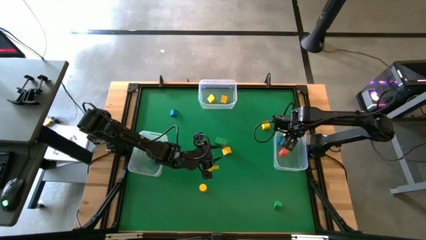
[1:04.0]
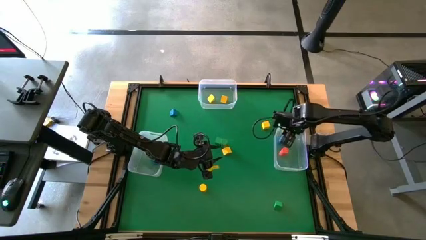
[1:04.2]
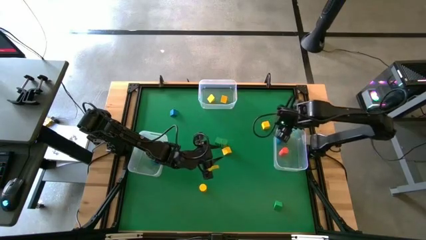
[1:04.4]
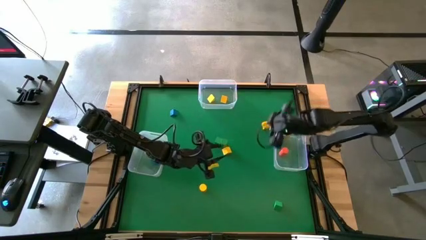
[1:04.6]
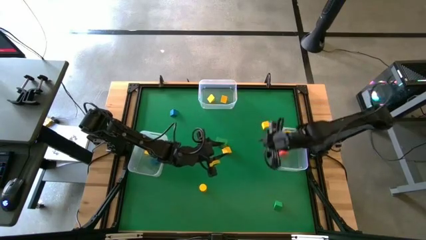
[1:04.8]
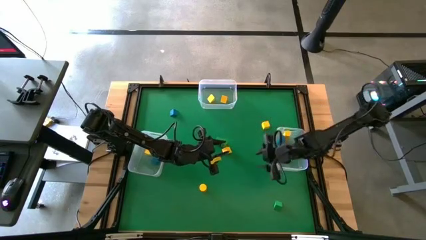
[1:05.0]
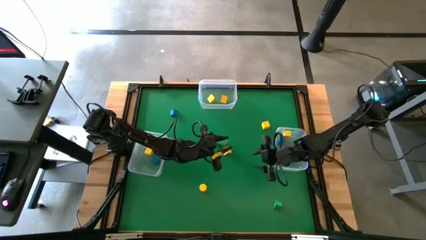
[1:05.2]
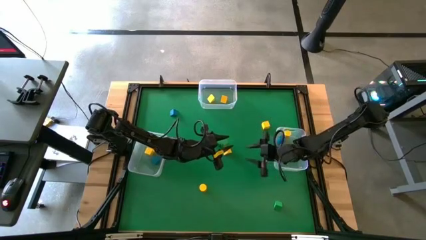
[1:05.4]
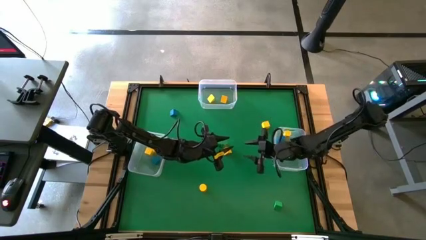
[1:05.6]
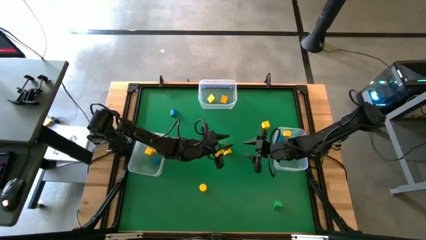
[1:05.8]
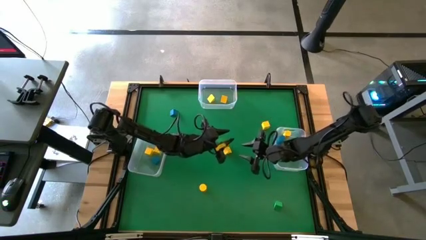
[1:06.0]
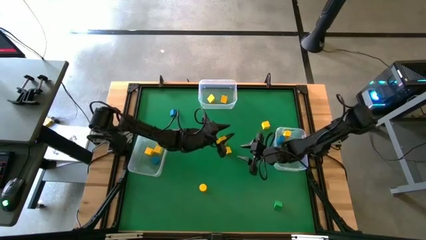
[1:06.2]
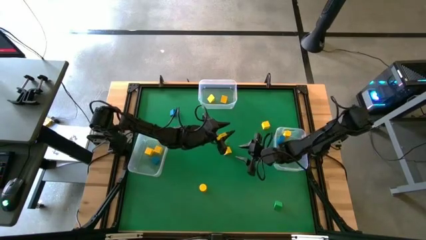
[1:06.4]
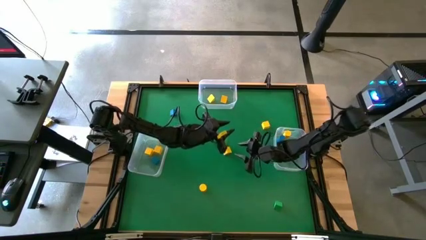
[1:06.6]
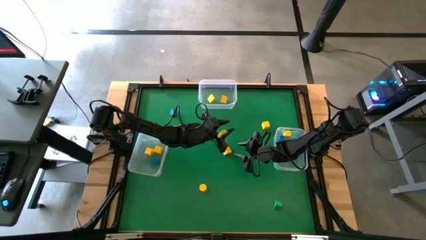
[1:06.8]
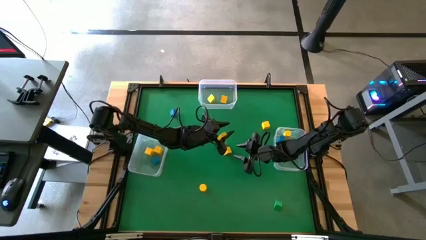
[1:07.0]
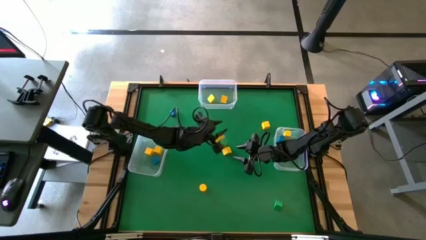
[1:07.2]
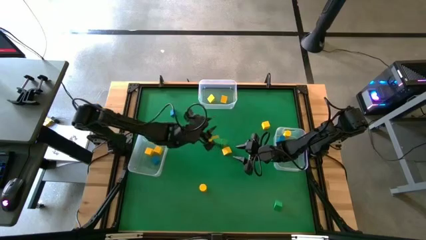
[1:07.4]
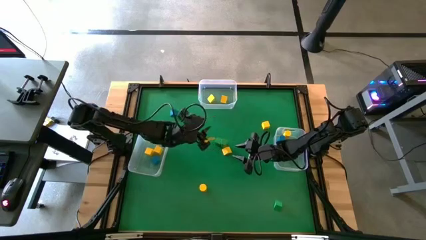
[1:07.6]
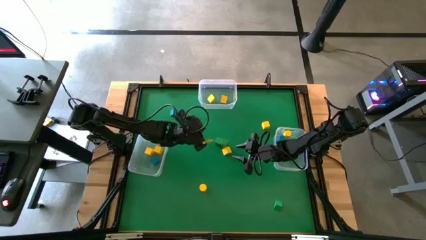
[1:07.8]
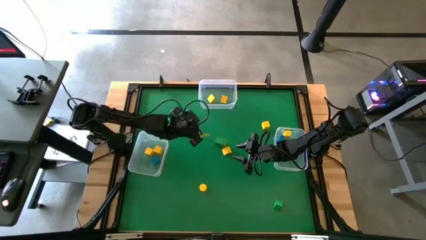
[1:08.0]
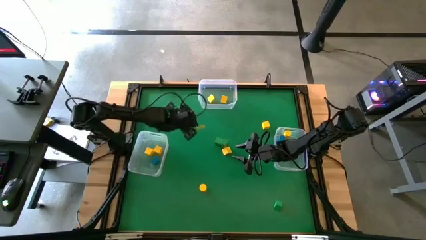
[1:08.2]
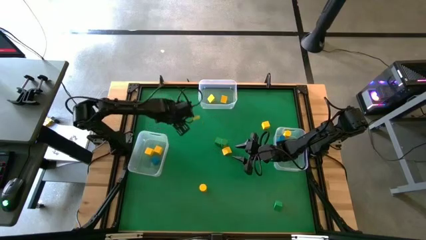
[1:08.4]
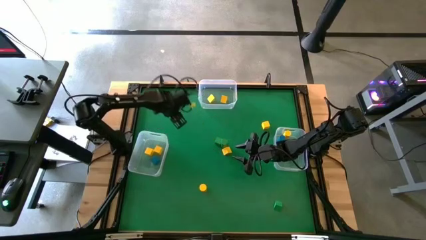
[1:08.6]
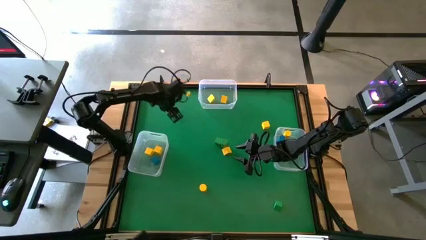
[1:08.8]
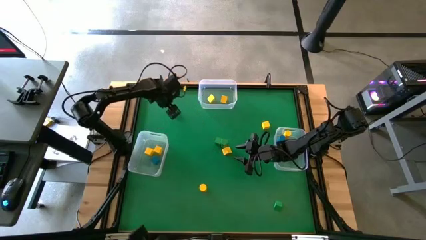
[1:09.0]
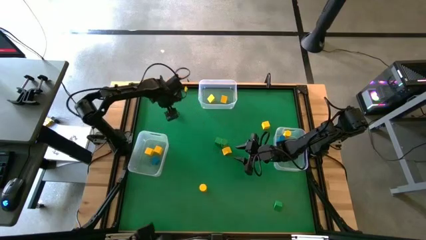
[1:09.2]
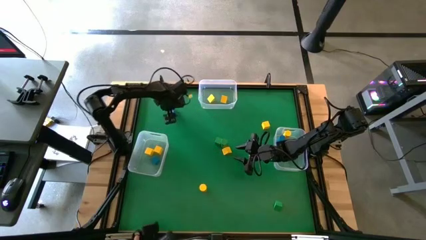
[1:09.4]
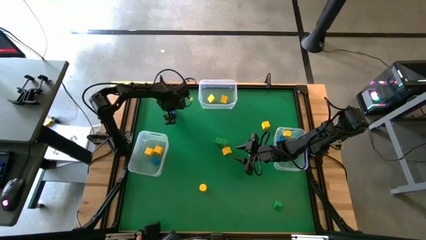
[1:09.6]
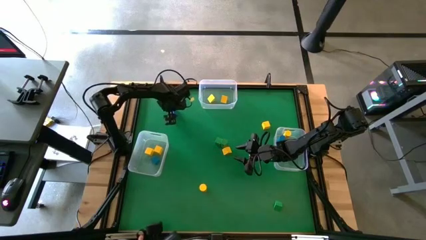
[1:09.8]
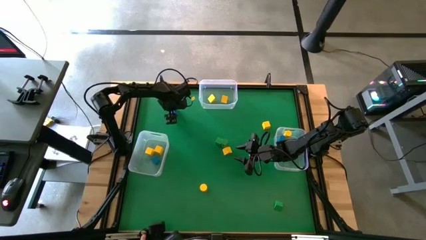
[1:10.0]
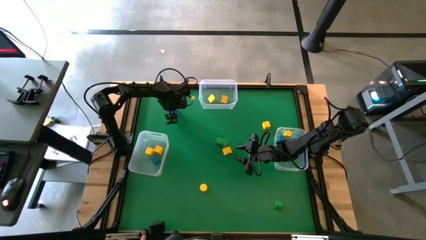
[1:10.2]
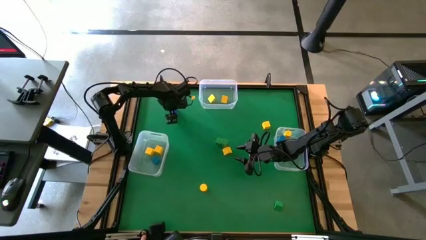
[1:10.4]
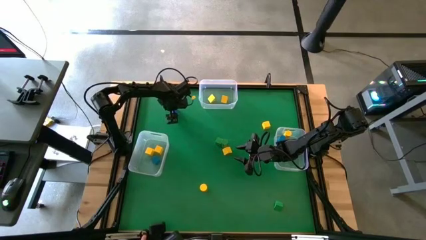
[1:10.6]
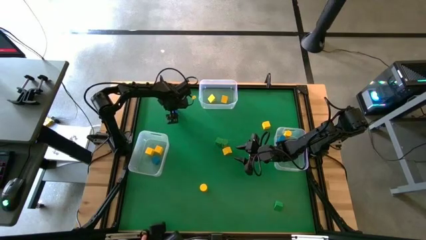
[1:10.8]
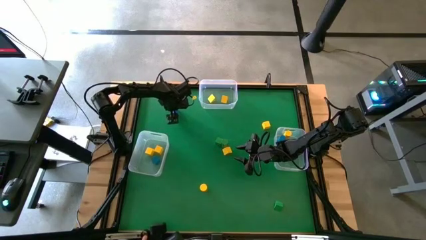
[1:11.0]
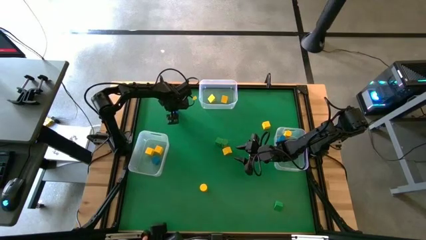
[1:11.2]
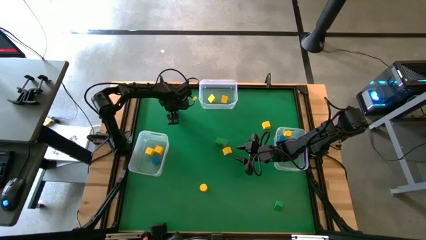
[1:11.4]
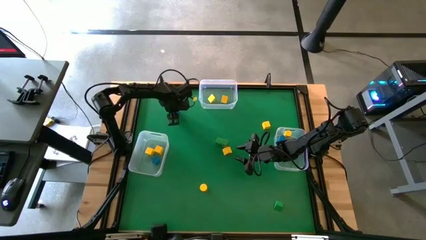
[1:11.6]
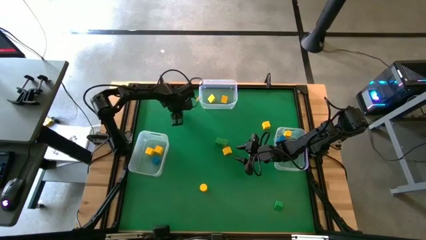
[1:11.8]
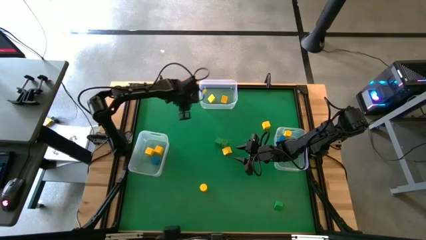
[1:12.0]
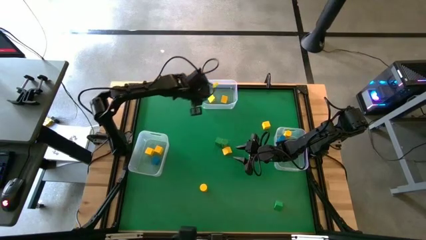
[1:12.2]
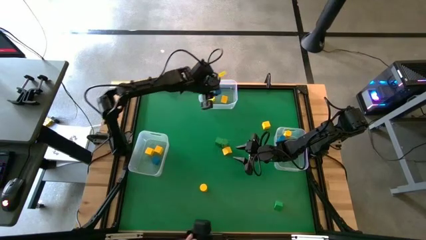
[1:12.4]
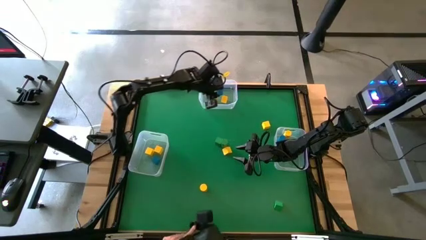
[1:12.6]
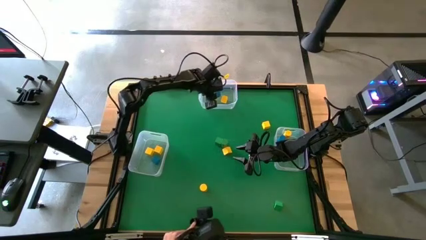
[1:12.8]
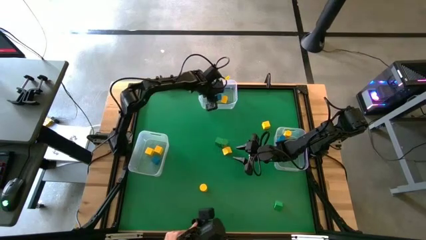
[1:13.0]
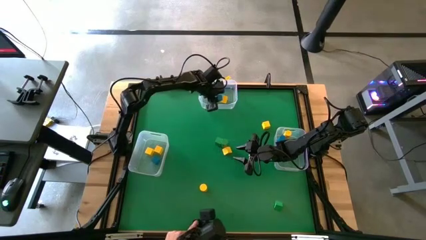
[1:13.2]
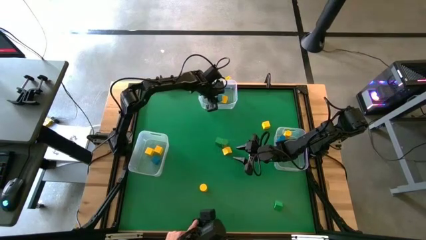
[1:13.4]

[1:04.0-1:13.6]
Task: Sort blocks by size
Put the blue triangle block into the top transparent bin

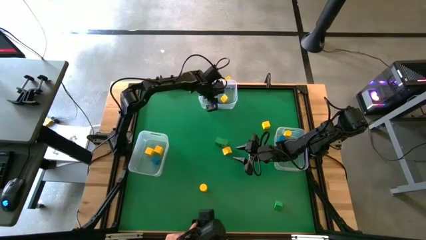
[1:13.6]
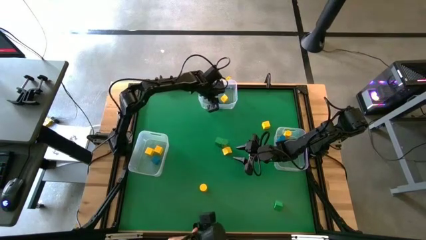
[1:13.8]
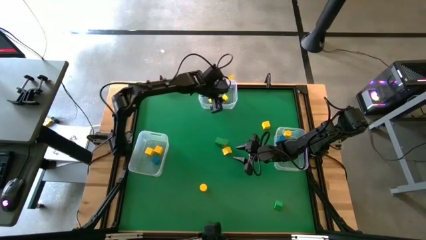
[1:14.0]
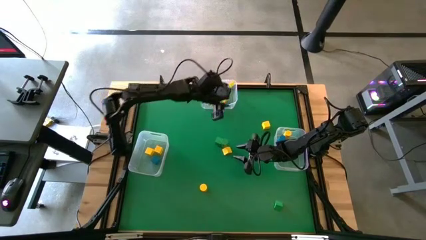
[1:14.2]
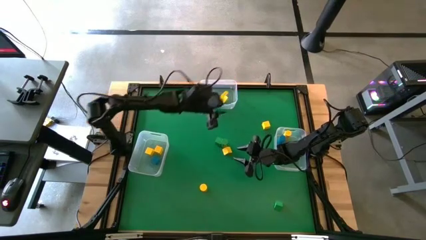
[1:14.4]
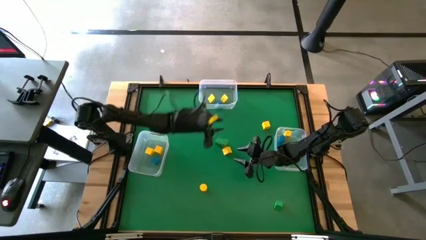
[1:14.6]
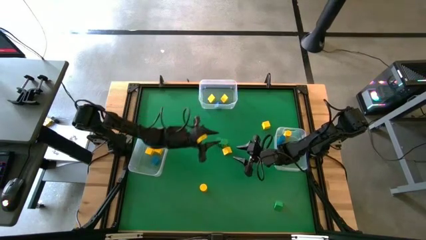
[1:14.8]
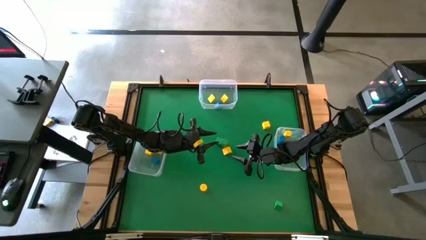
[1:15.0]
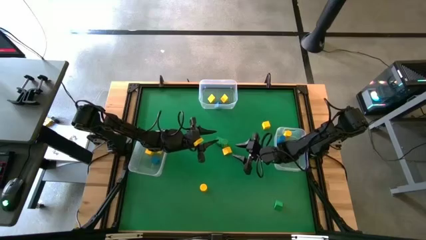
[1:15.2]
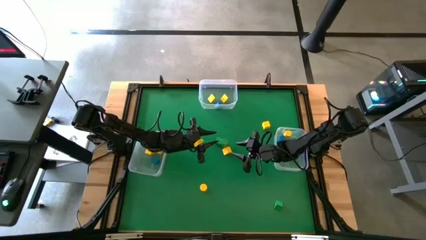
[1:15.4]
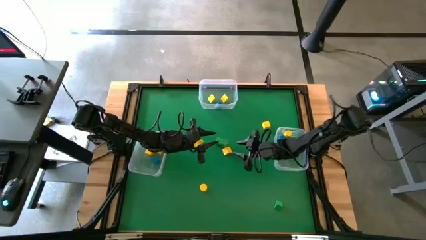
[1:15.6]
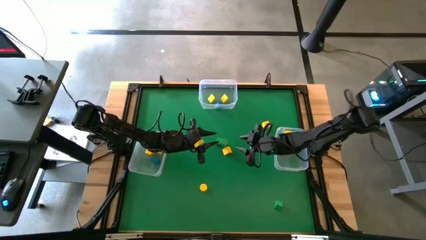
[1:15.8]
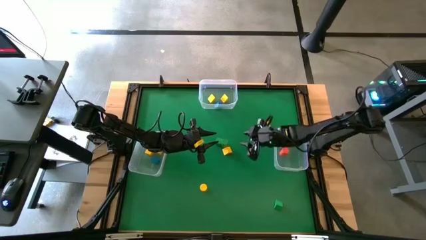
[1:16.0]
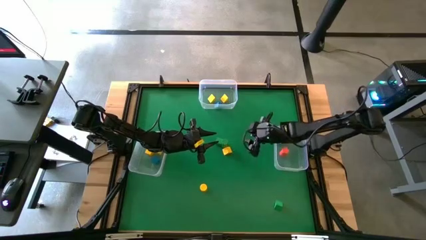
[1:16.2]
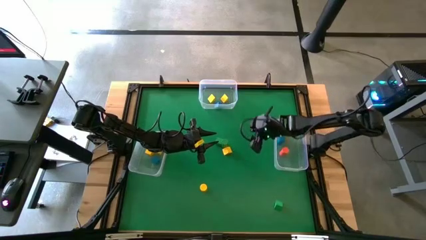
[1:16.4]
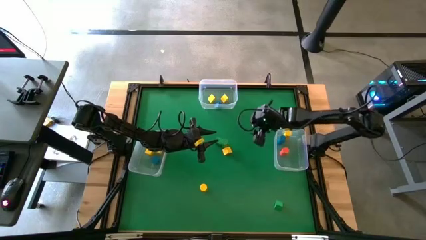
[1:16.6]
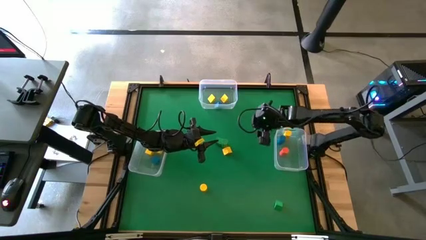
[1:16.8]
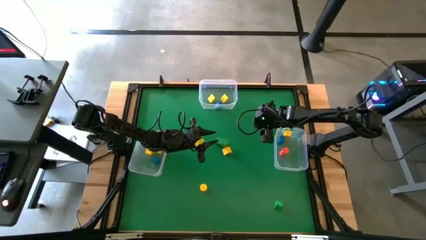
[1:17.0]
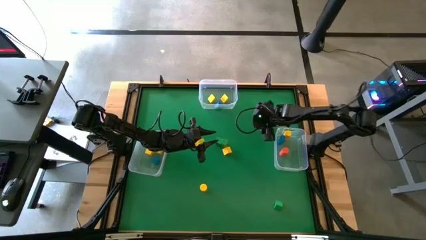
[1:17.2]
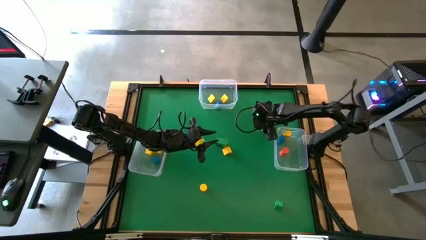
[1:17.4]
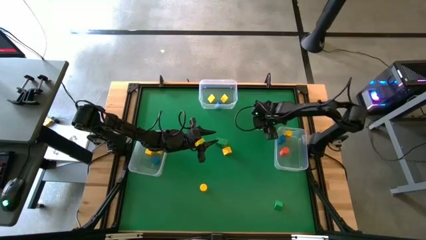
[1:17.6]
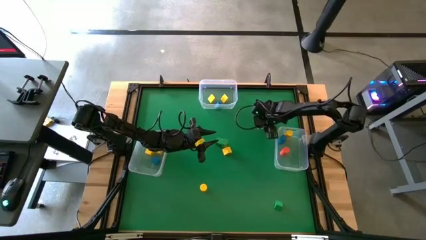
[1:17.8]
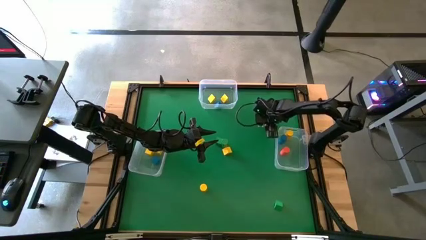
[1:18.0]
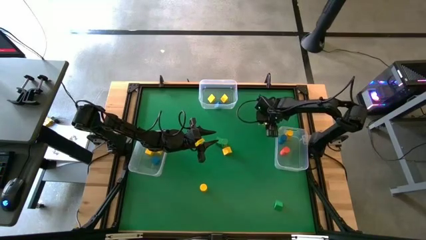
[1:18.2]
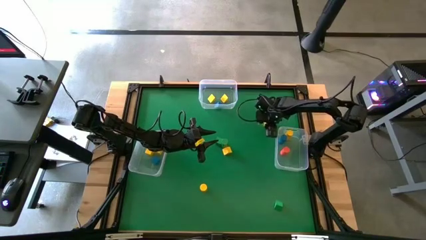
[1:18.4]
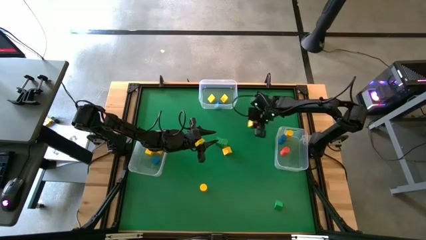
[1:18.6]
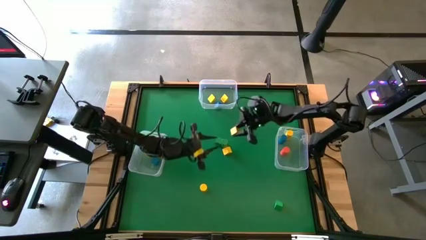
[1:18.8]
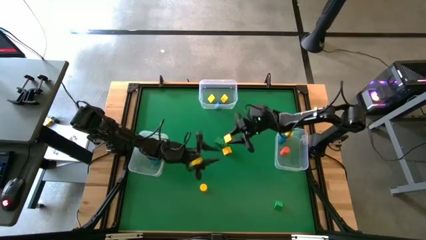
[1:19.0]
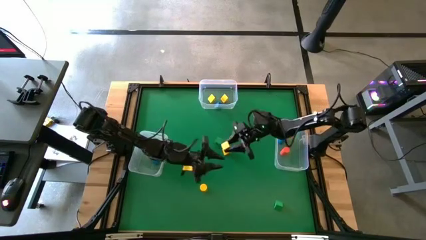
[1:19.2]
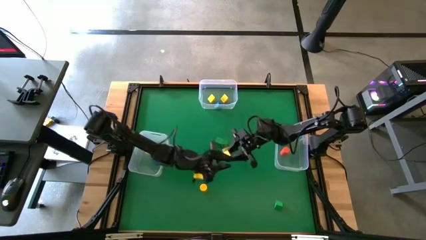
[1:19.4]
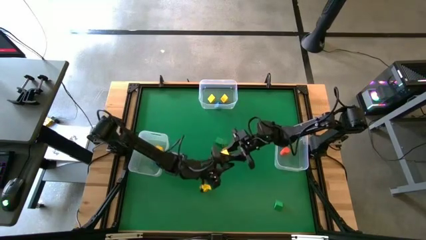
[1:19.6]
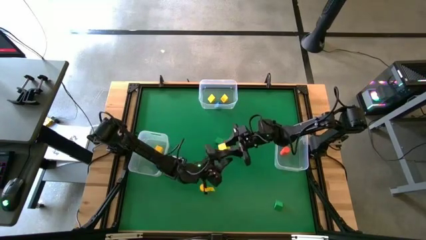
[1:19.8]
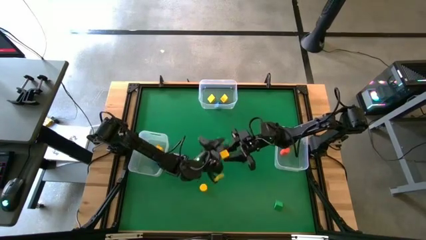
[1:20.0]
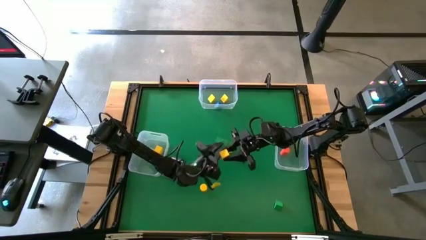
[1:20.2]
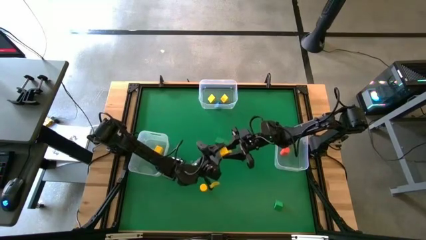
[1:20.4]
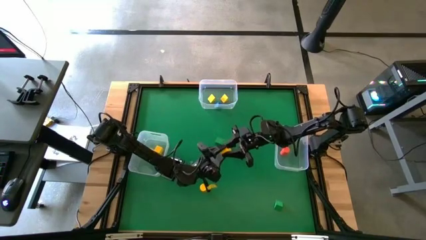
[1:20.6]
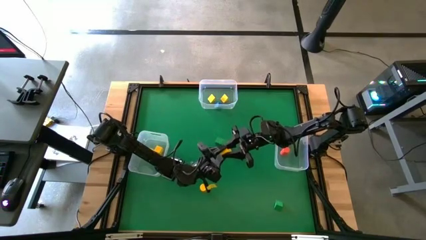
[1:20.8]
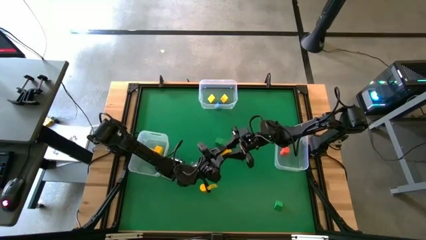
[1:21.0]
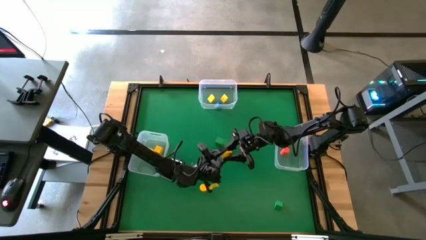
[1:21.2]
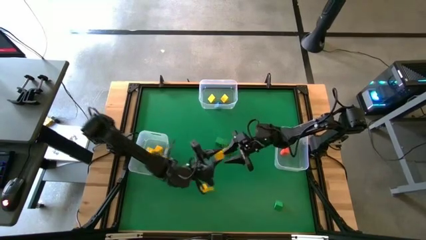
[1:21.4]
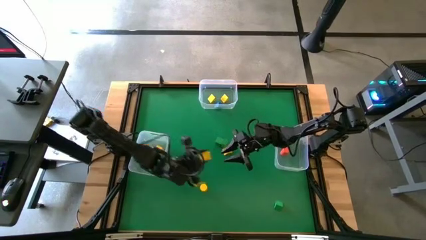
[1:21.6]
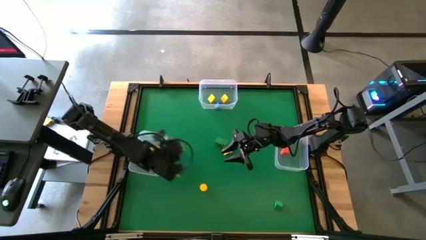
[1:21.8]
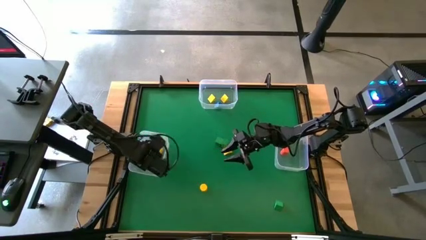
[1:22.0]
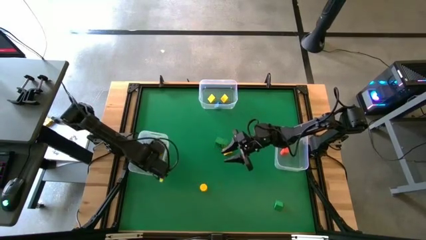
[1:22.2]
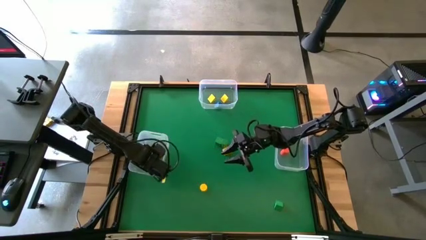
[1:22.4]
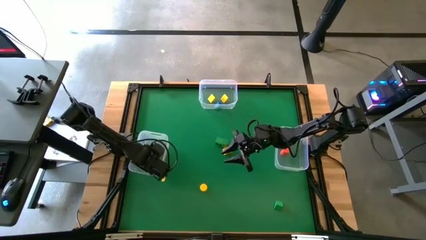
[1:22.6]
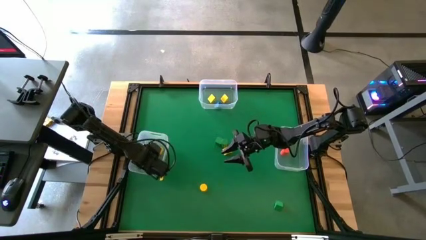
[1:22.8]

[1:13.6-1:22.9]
Put the yellow square block into the left transparent bin
